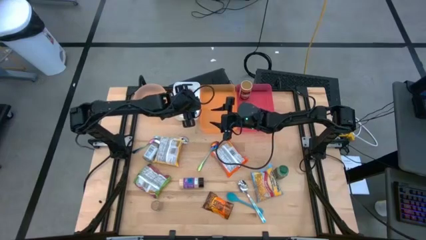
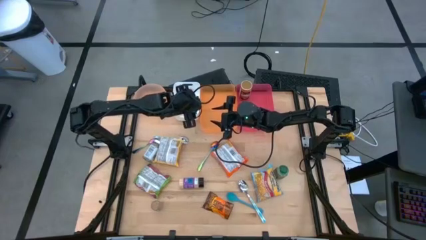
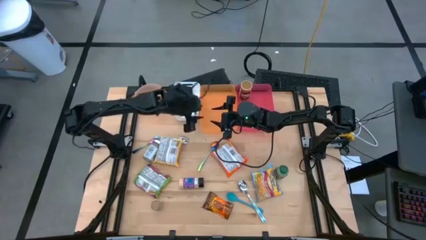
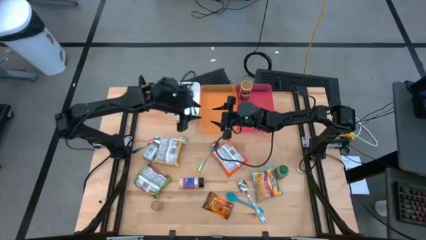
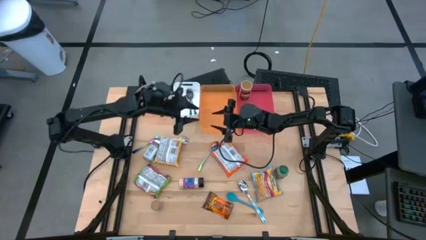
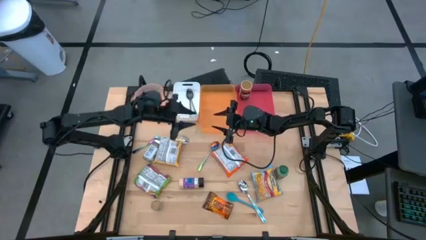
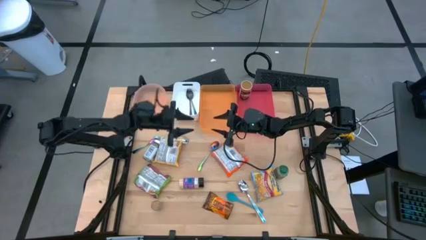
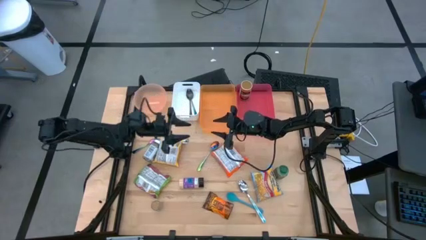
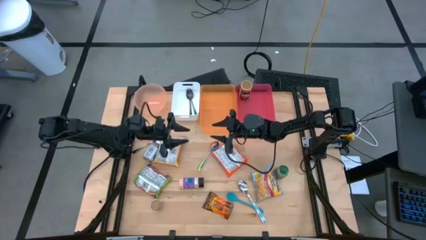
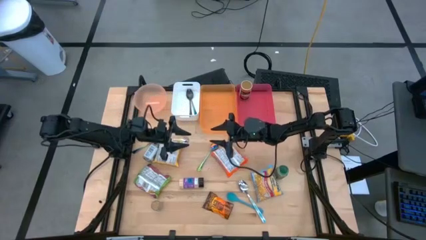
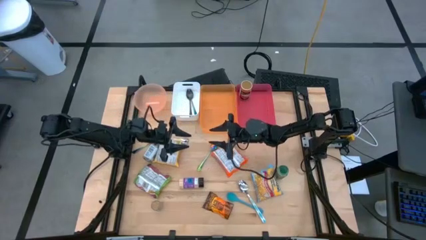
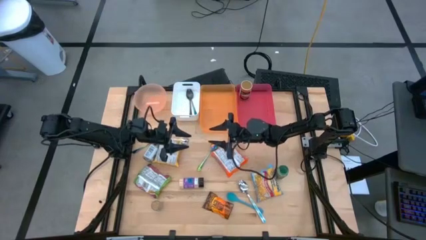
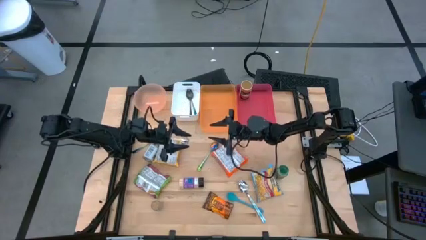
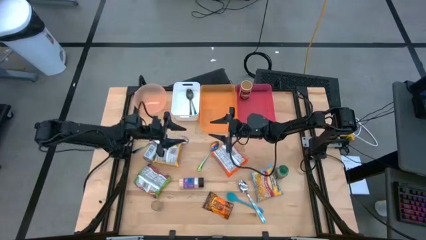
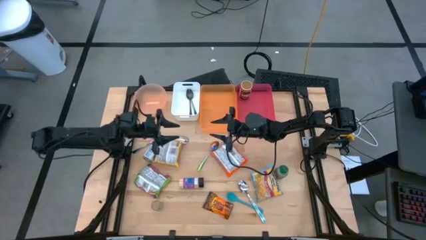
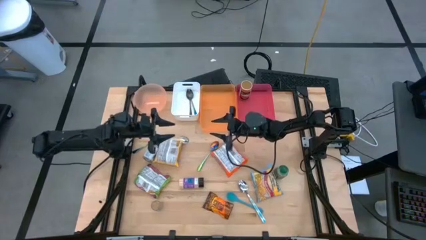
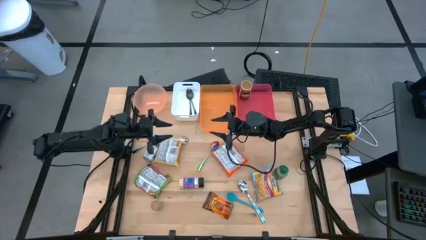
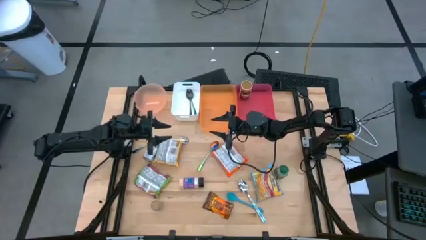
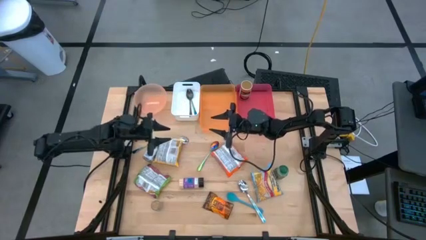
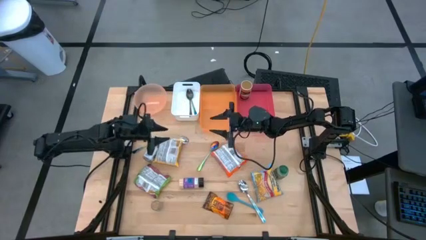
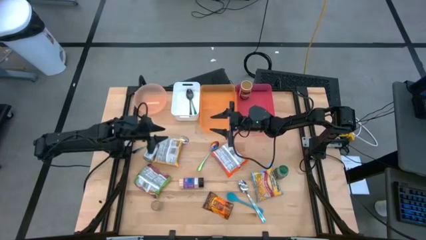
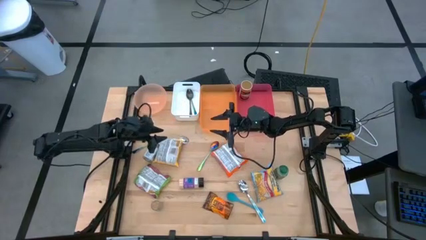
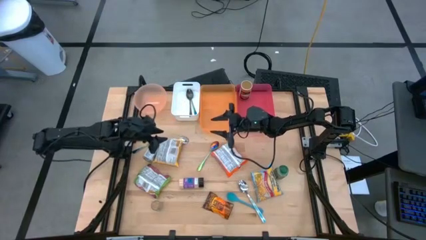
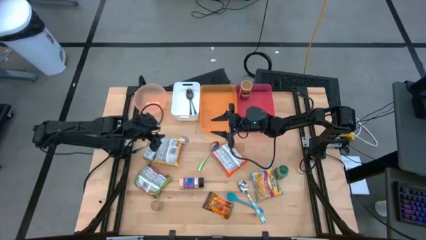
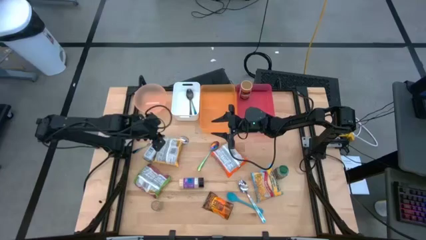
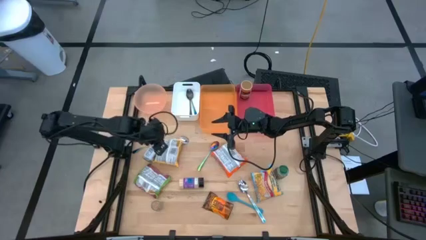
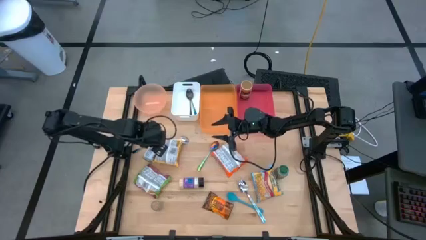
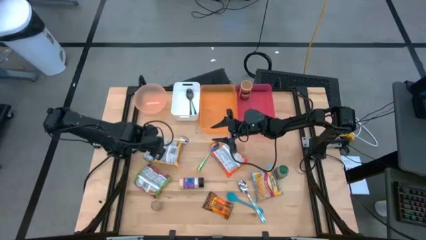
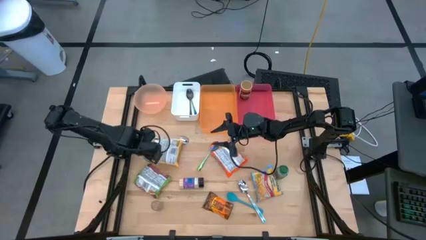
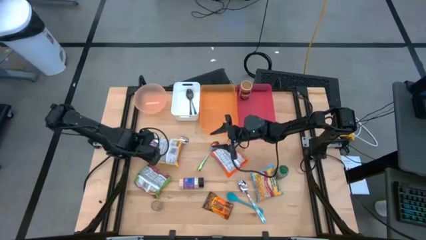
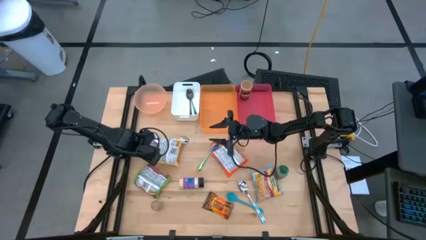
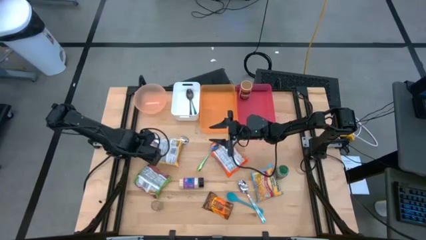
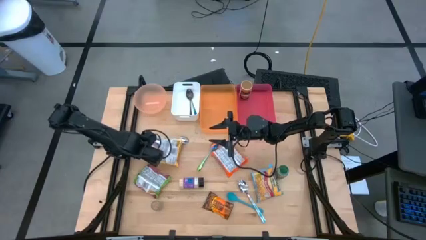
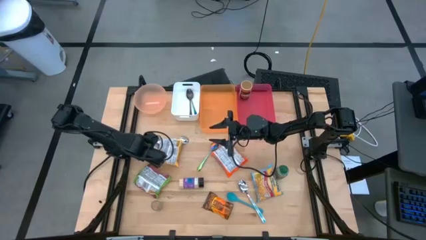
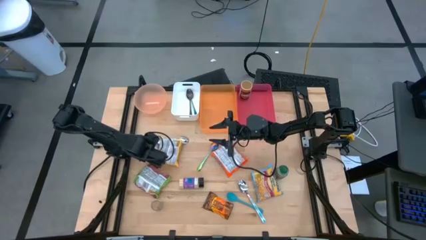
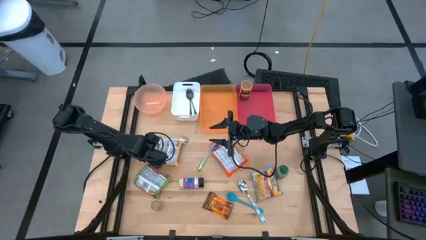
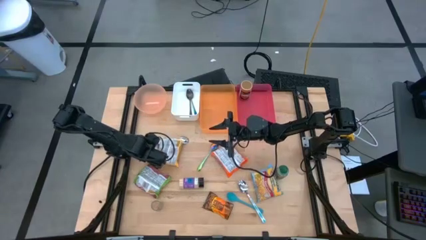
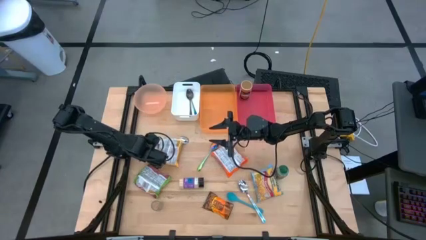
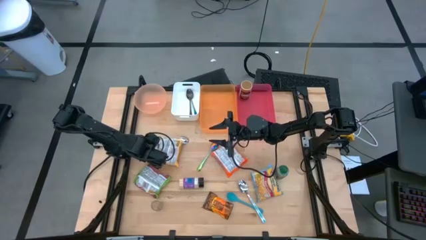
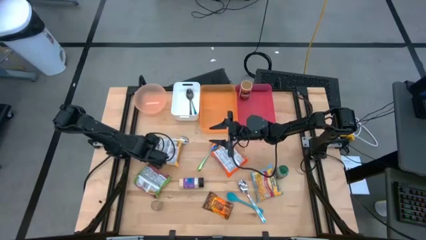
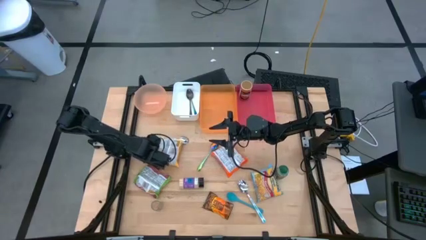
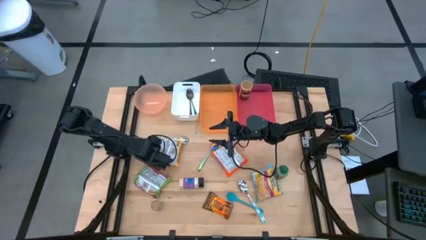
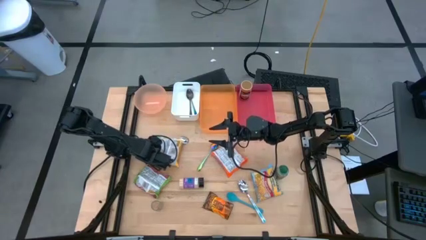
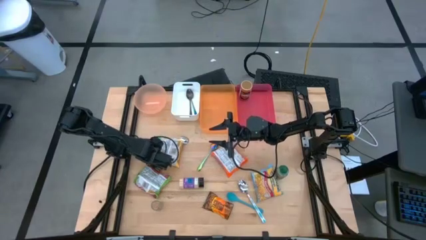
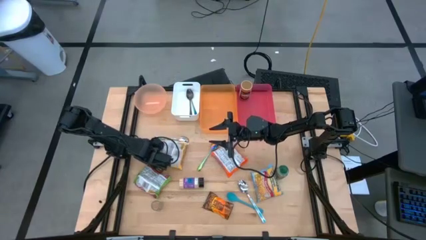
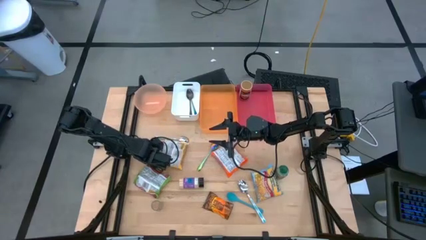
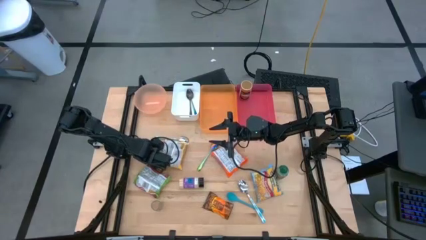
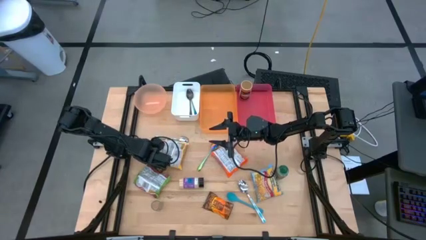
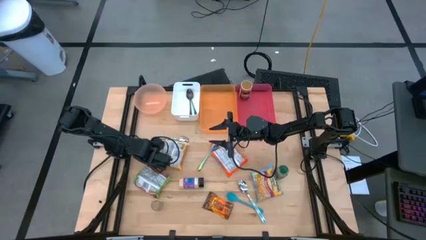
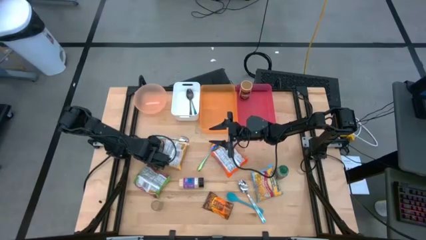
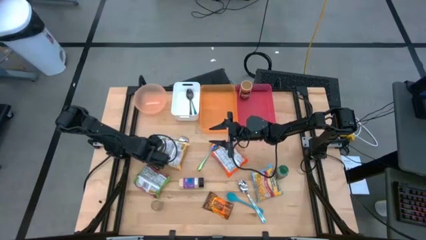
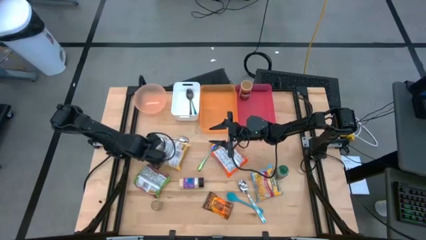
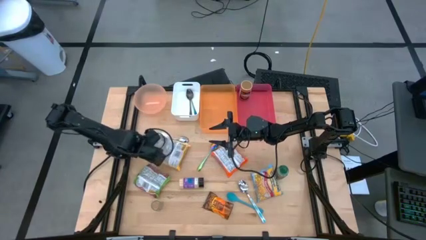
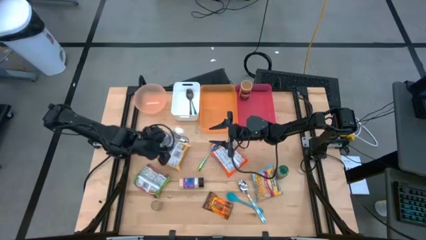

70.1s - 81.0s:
Task: Pick & Place Food Item
Put the white seasoning bottle into the red bin

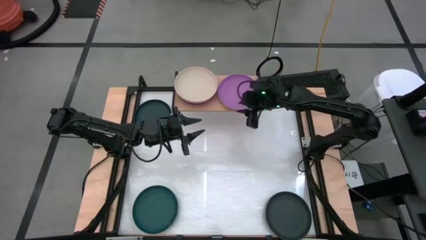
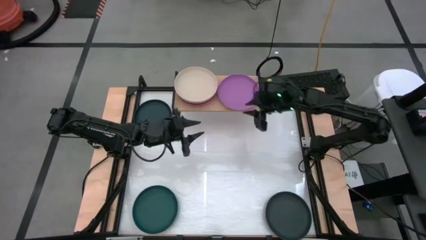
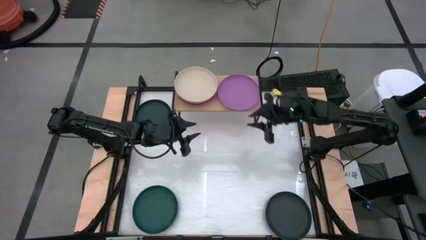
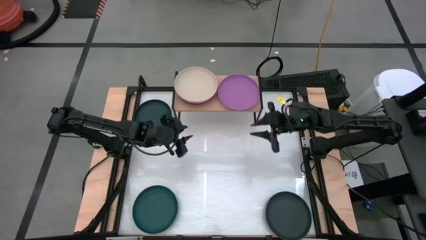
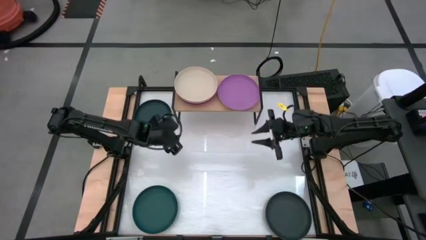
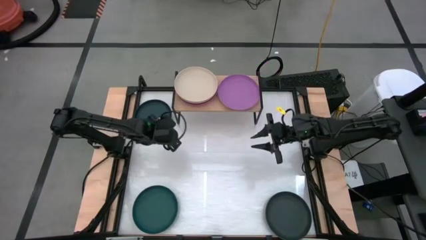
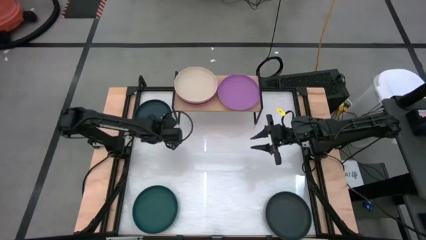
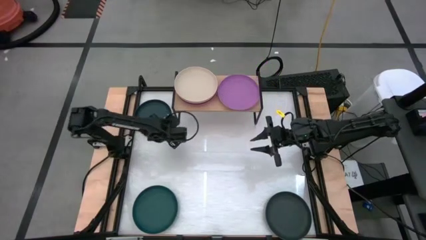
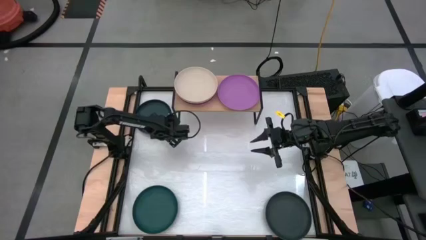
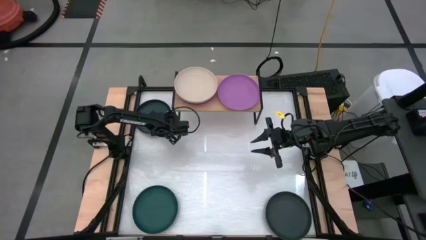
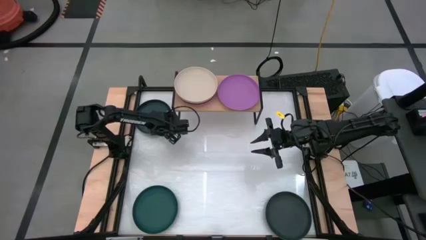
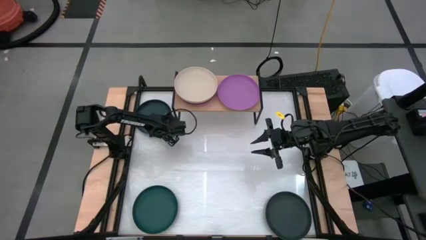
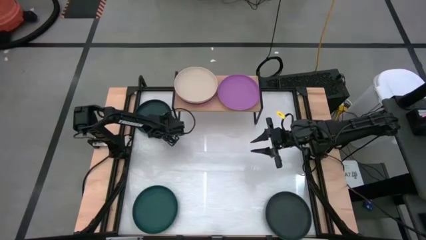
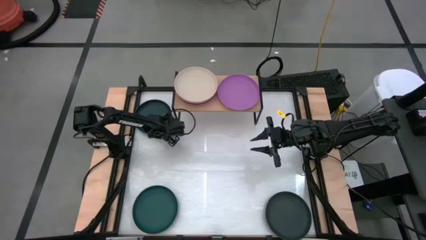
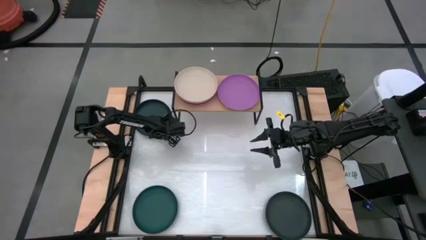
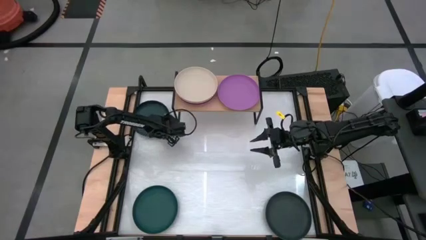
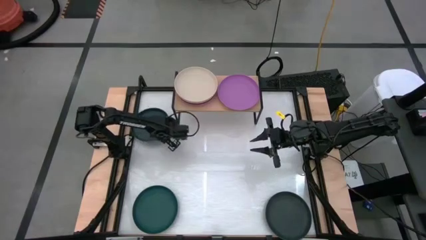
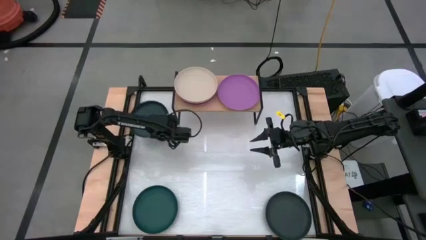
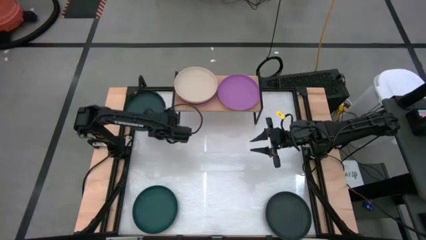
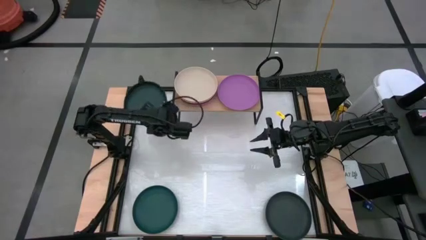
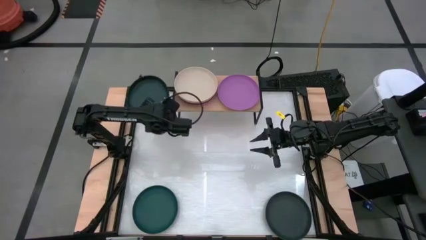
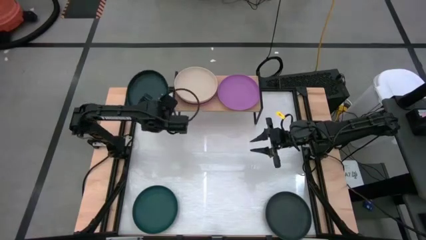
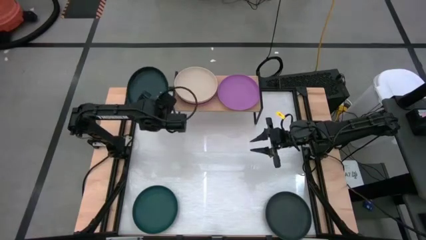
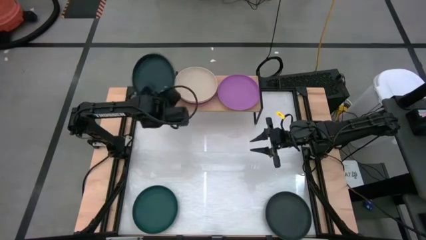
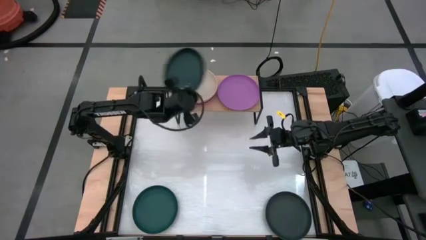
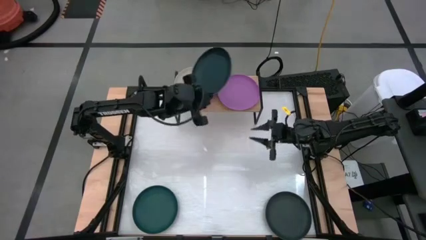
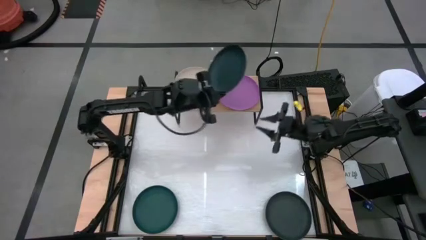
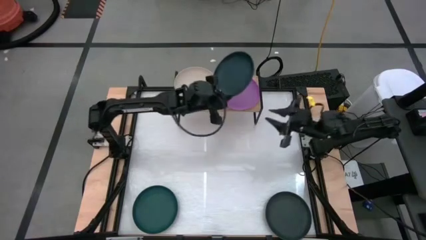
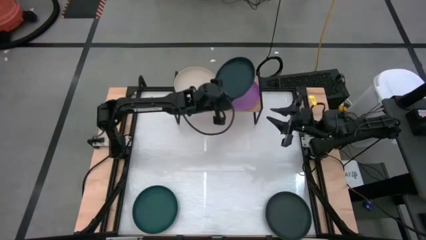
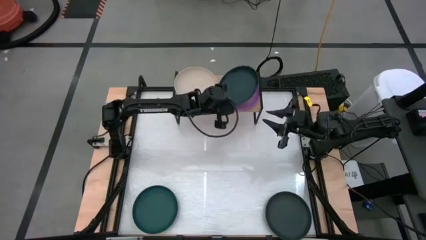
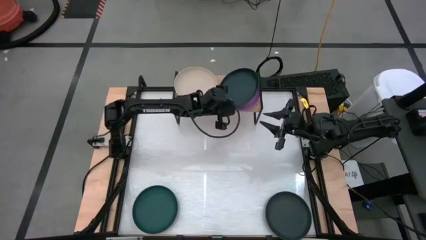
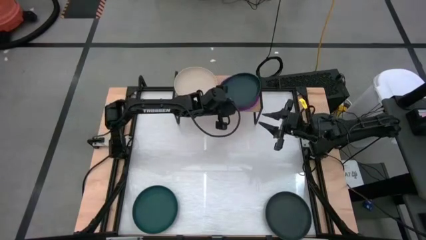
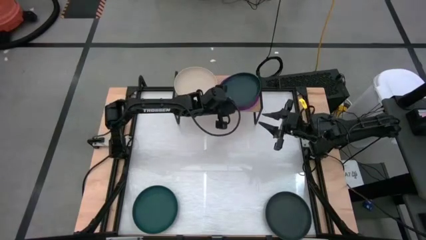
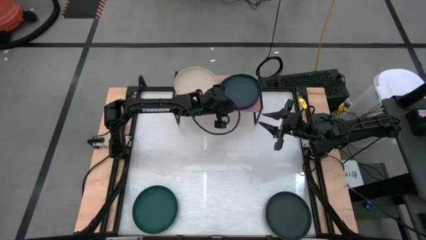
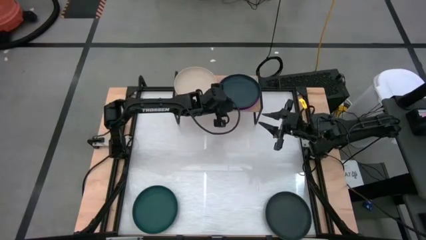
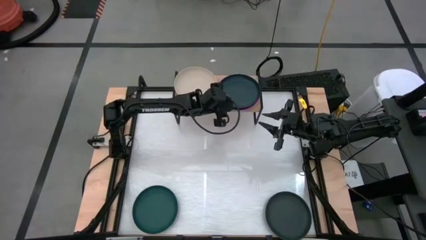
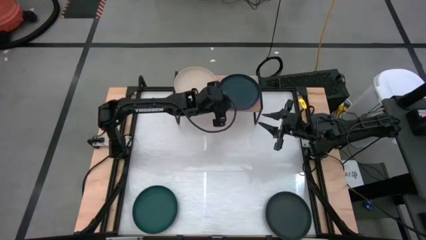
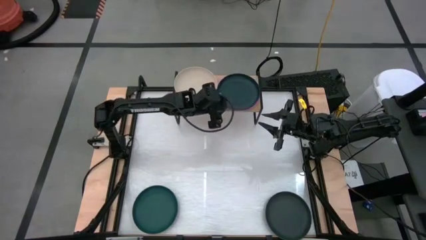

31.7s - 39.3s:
Task: Place and stack plates onto a shelf
Stack the top left dark green plate on top of the violet plate on the shelf
